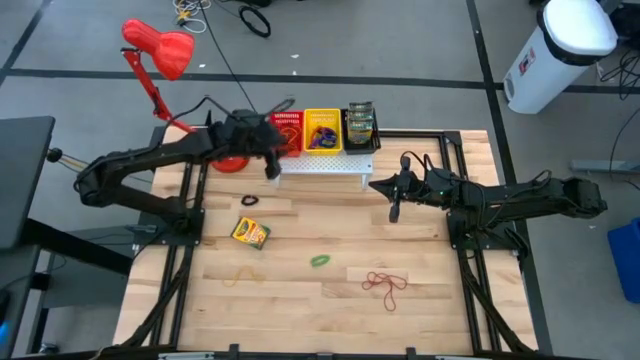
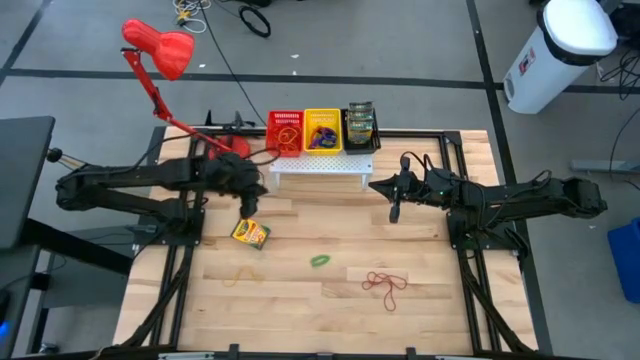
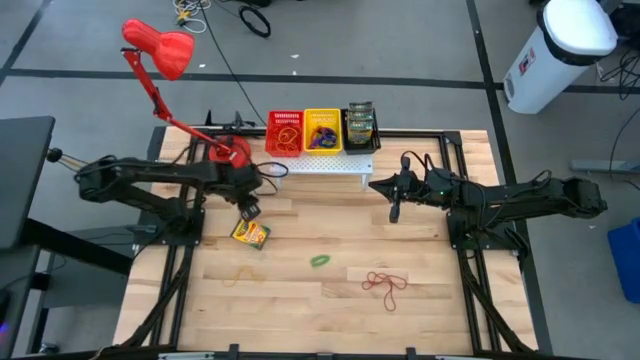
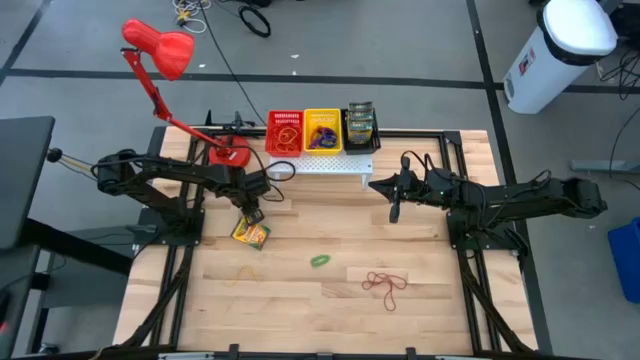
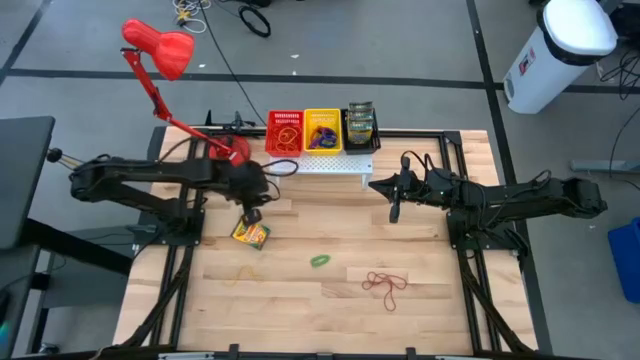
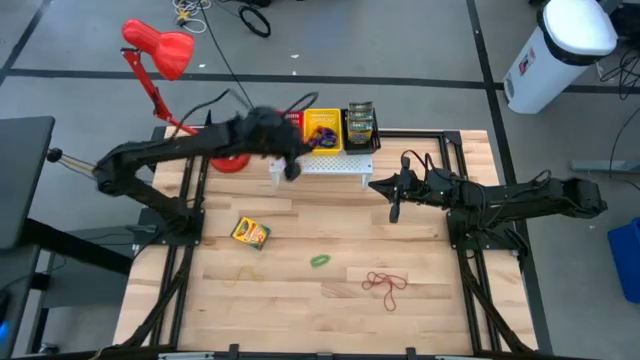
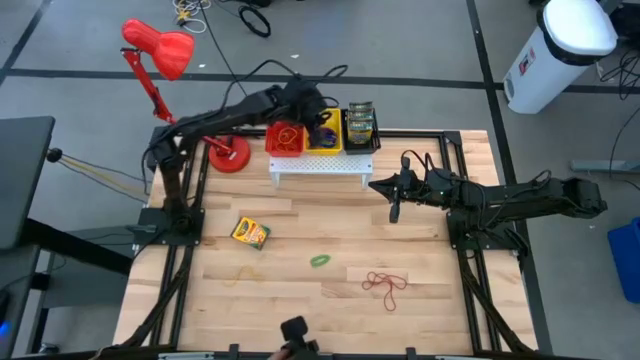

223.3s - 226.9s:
Task: Pick & Place Office Desk Supplies
Put the black spring keychain into the yellow bin on the shelf

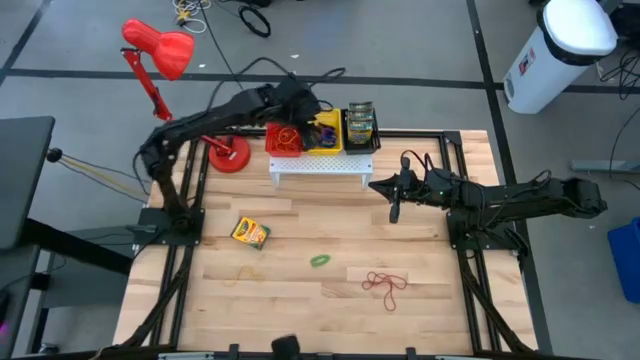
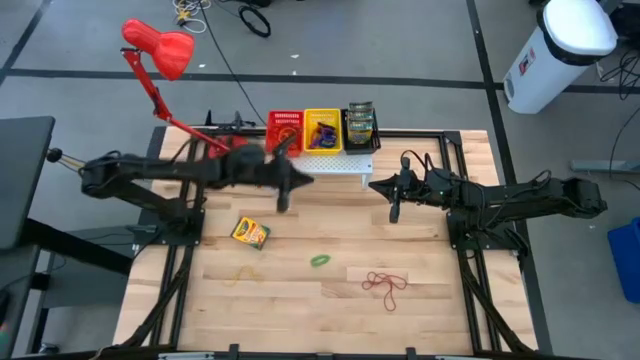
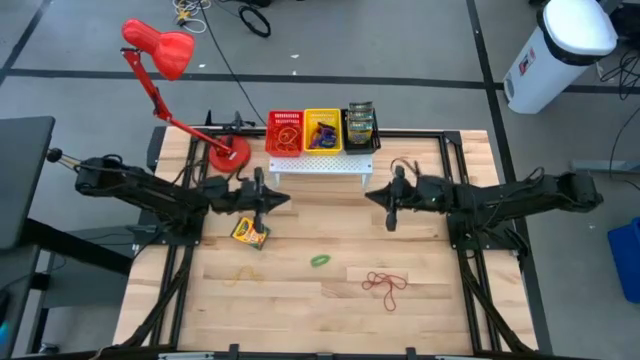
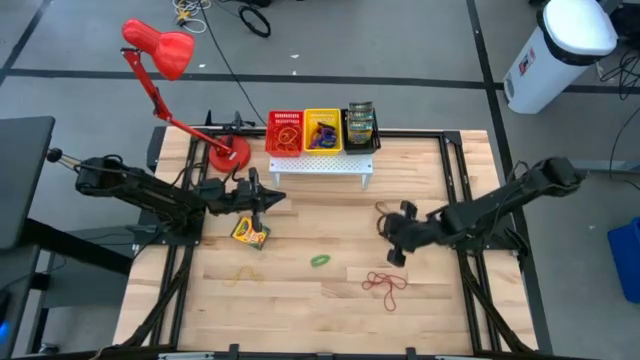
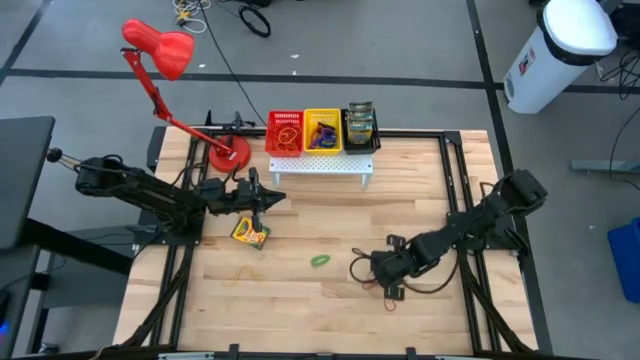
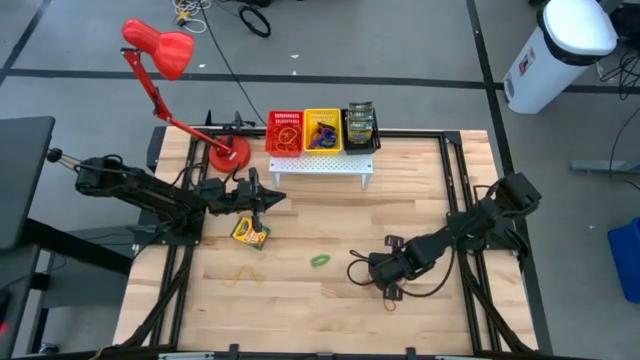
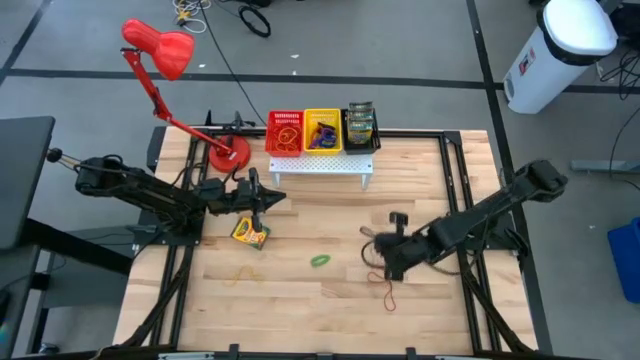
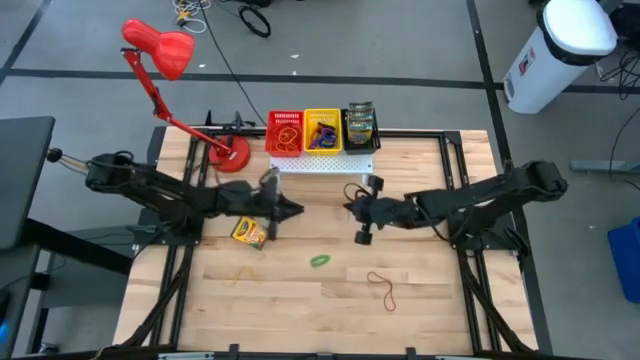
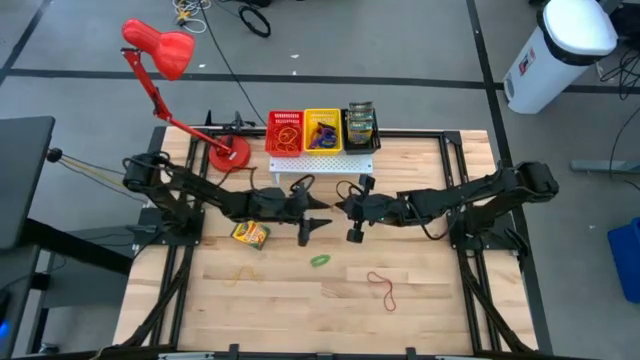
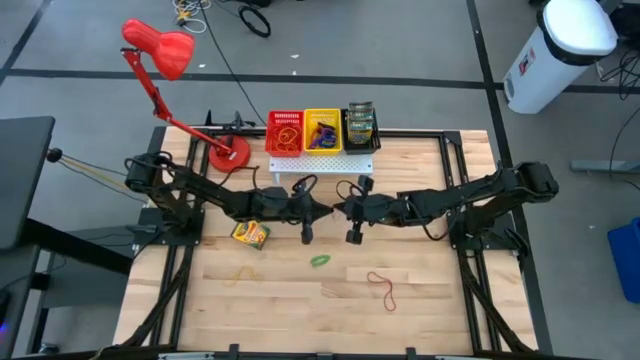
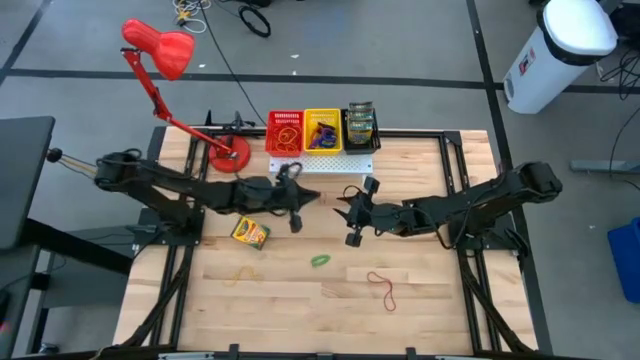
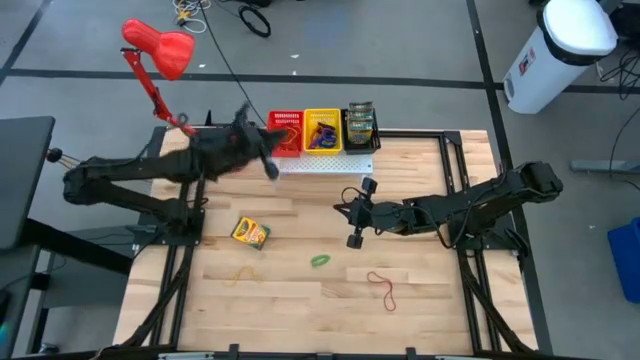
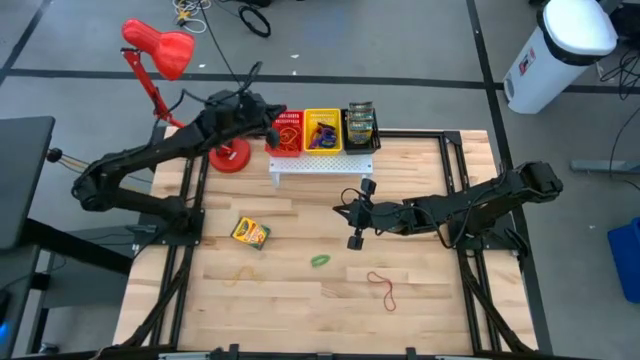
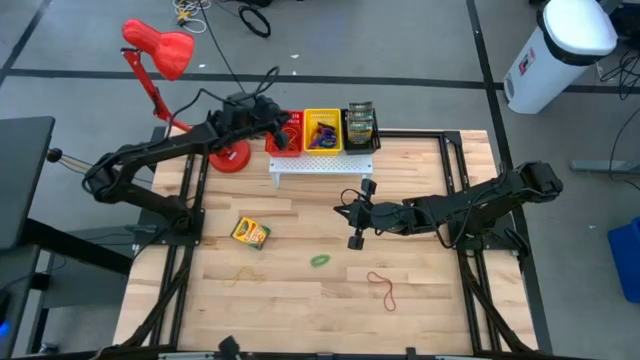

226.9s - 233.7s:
Put the red rubber band into the red bin on the shelf

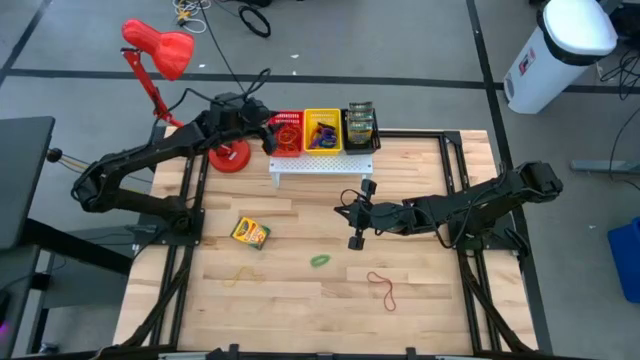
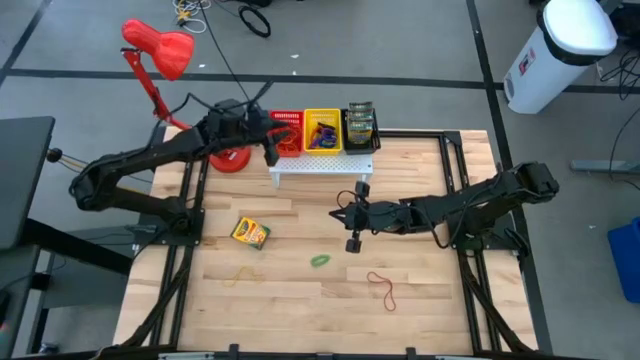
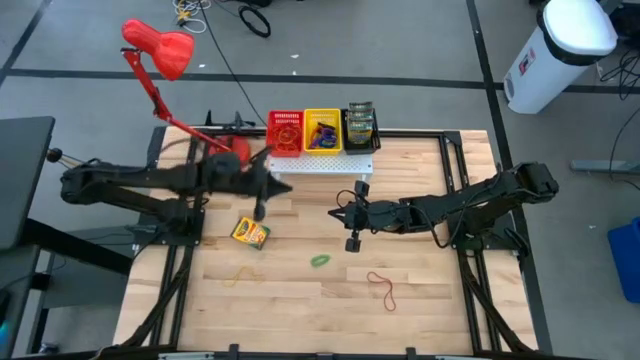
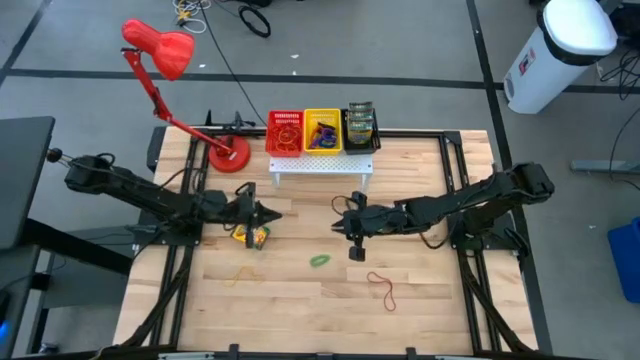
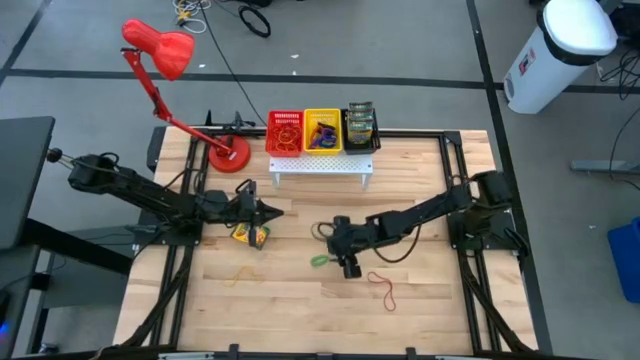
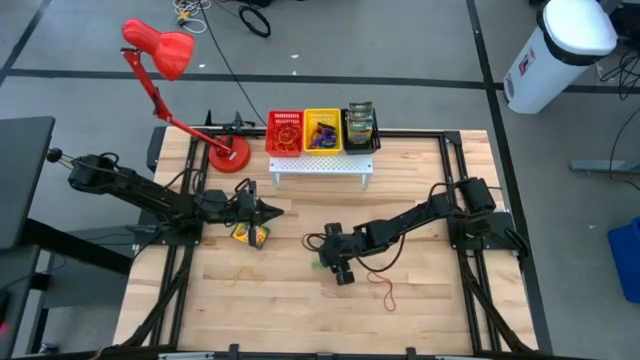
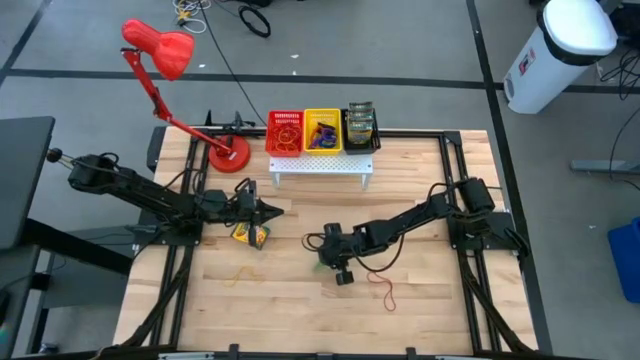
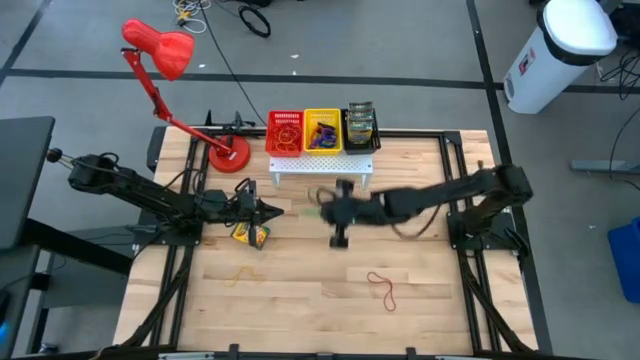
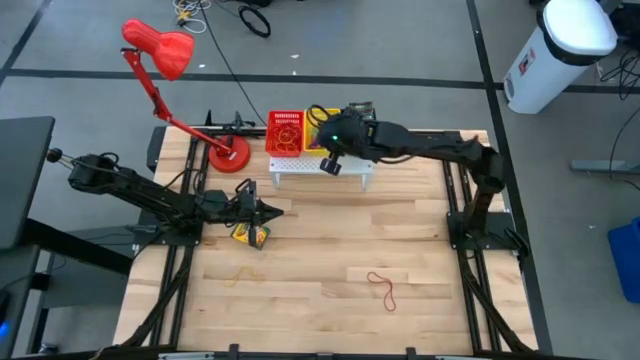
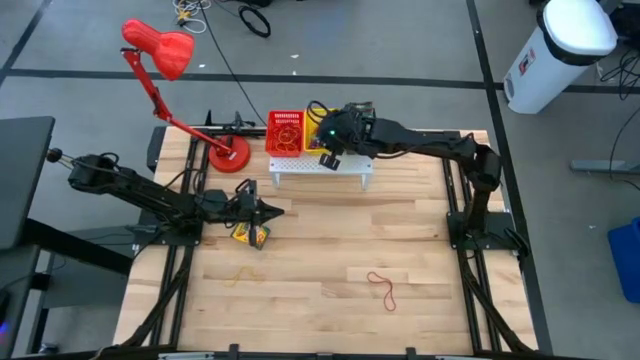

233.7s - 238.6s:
Put the green spring keychain into yellow bin

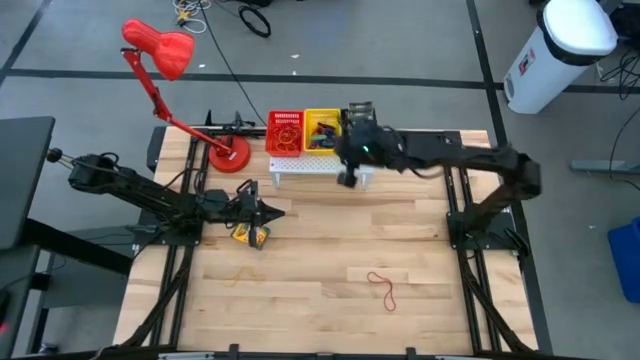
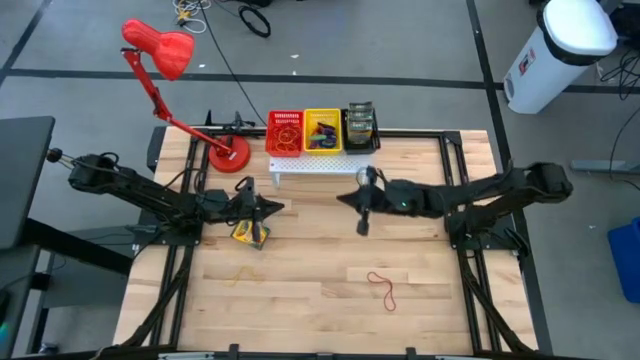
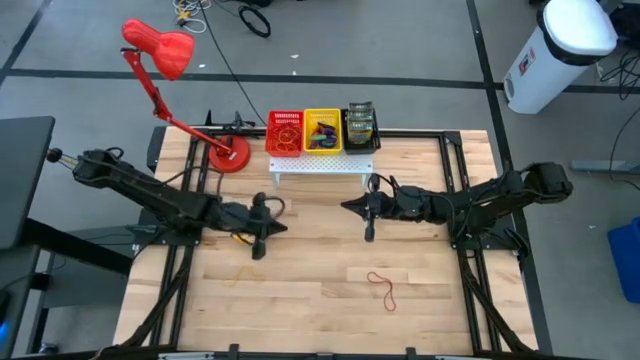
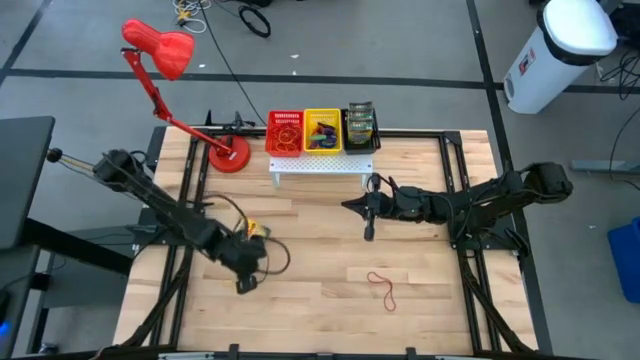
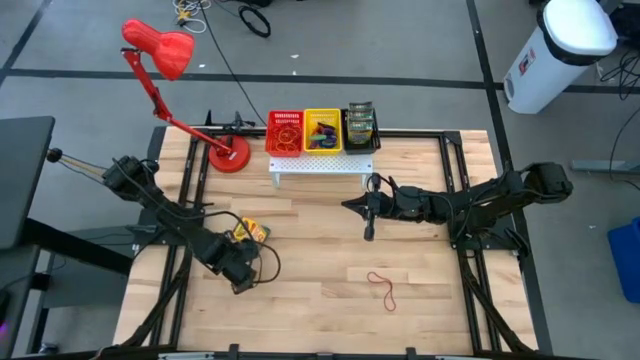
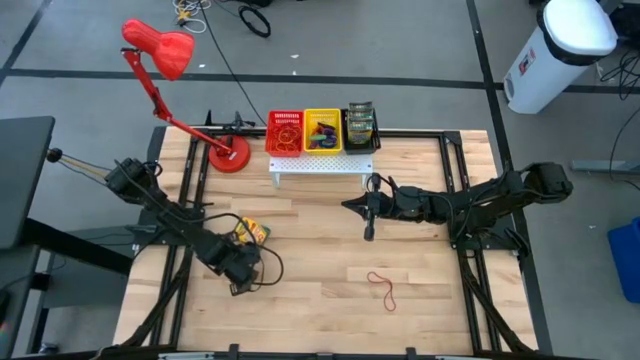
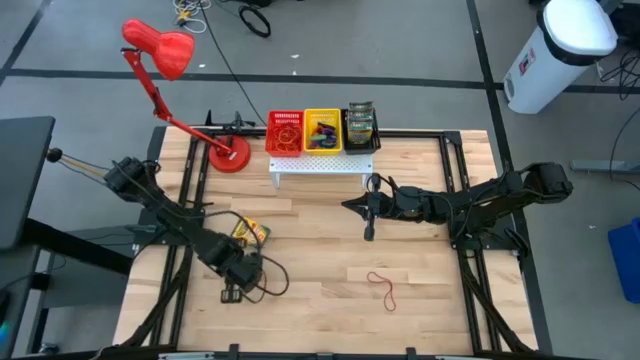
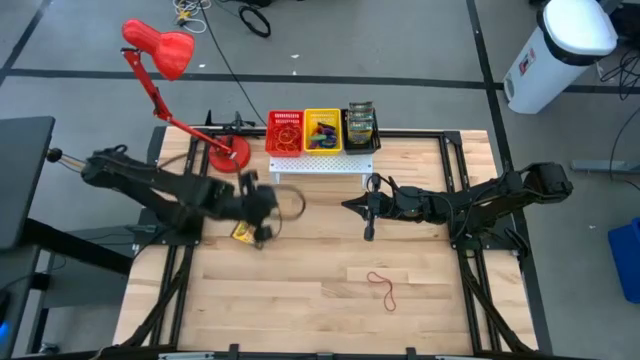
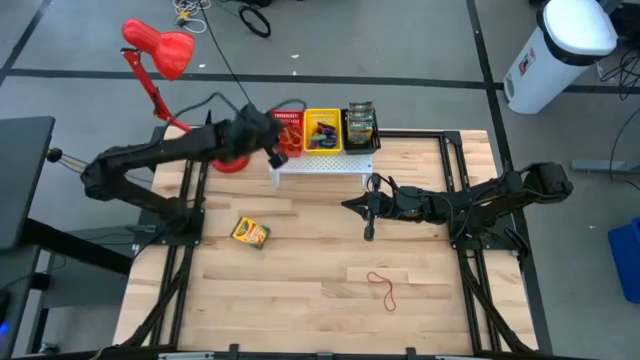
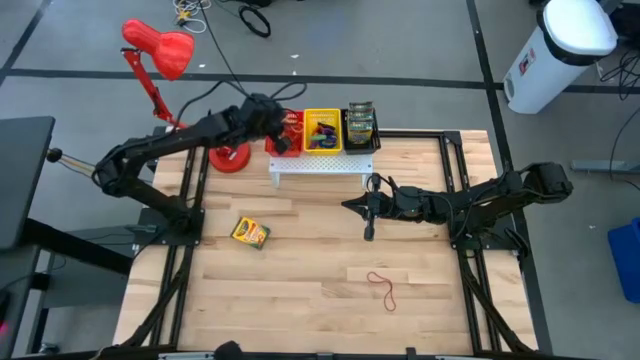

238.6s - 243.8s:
Put the yellow rubber band into the red bin on the shelf
